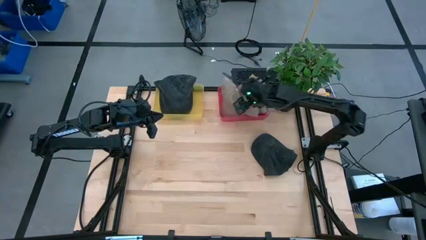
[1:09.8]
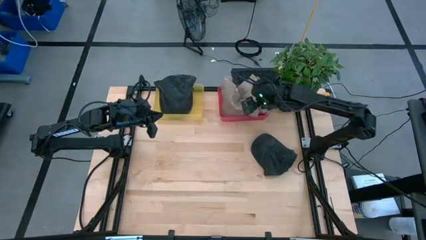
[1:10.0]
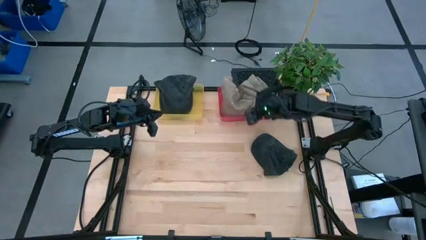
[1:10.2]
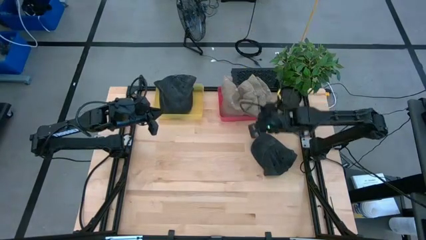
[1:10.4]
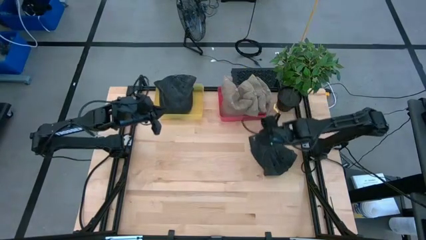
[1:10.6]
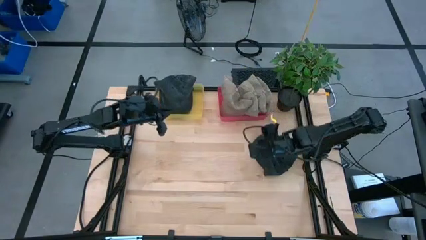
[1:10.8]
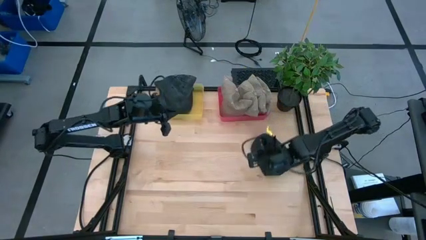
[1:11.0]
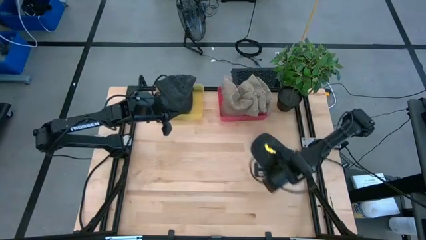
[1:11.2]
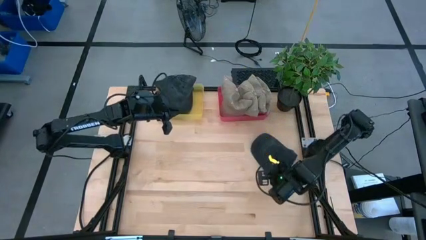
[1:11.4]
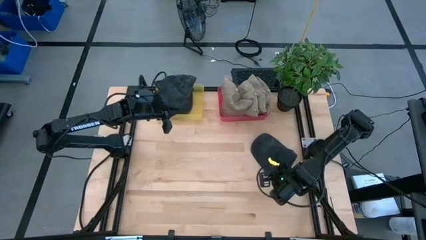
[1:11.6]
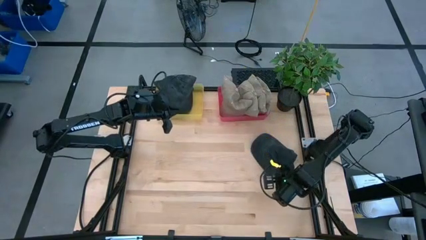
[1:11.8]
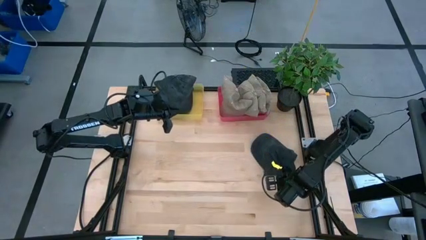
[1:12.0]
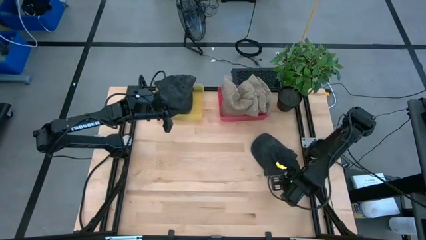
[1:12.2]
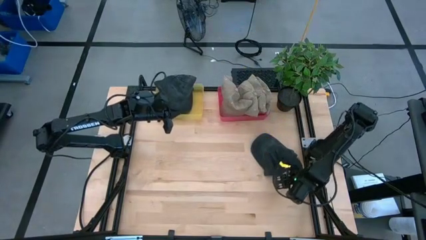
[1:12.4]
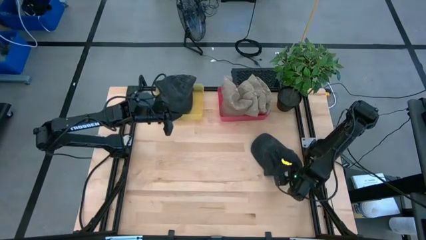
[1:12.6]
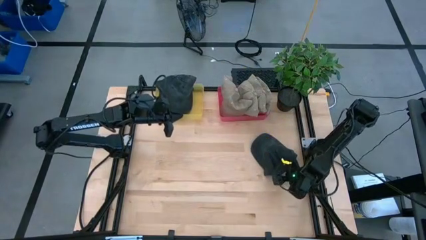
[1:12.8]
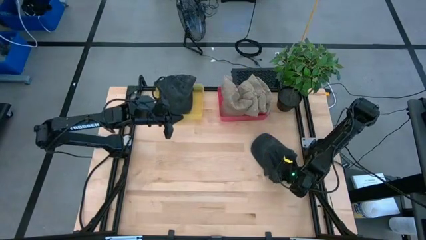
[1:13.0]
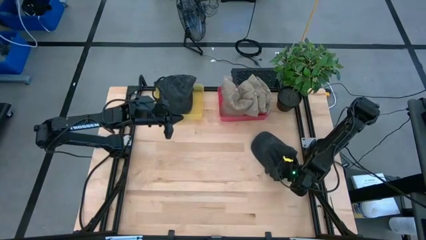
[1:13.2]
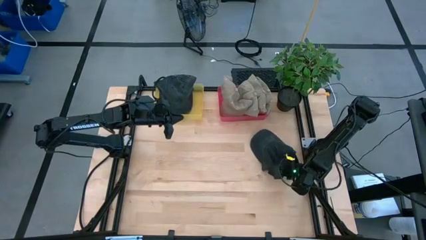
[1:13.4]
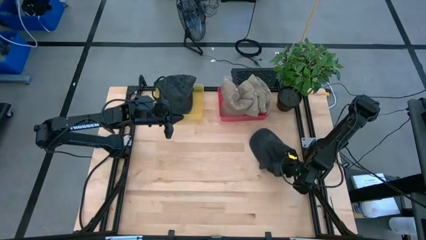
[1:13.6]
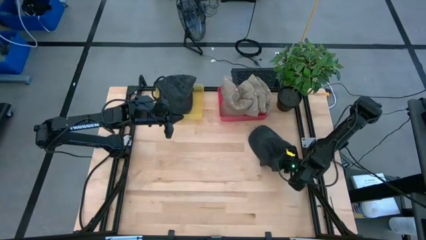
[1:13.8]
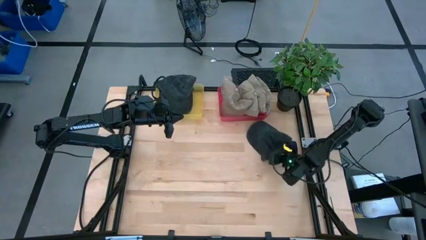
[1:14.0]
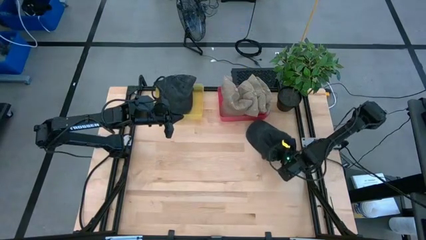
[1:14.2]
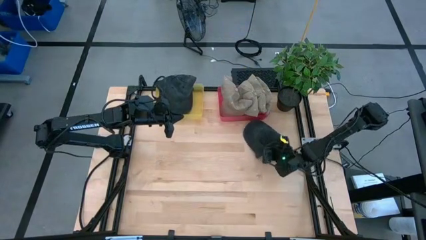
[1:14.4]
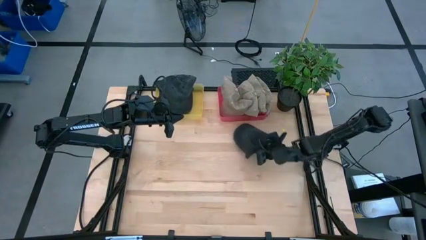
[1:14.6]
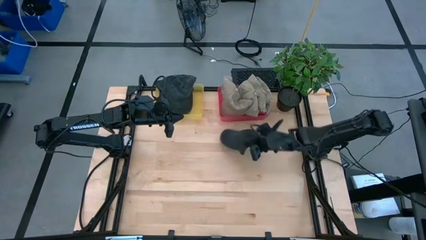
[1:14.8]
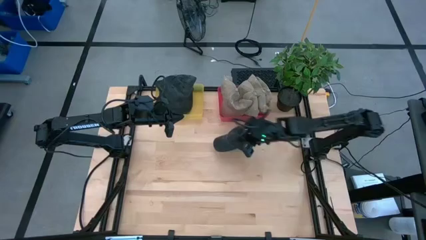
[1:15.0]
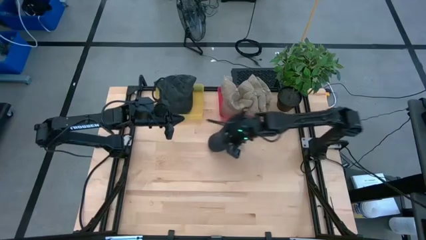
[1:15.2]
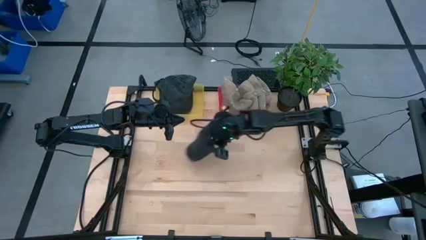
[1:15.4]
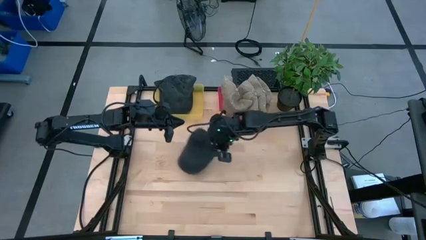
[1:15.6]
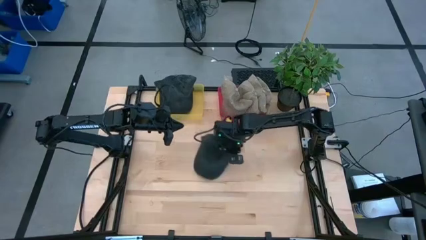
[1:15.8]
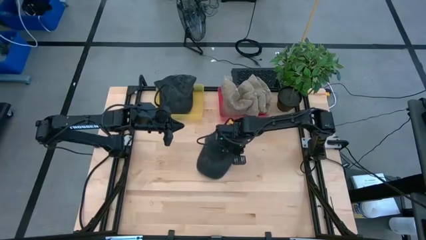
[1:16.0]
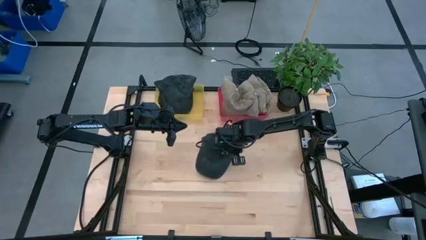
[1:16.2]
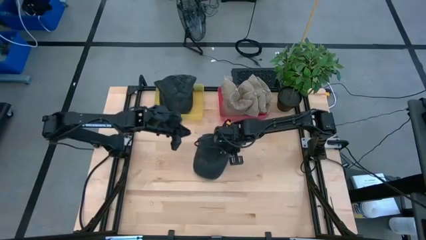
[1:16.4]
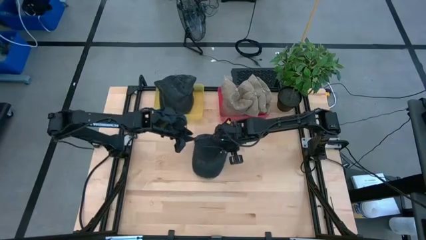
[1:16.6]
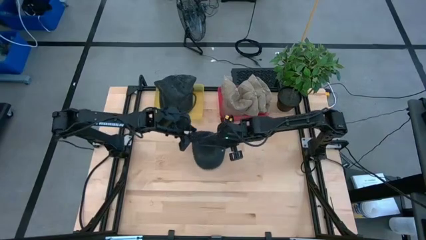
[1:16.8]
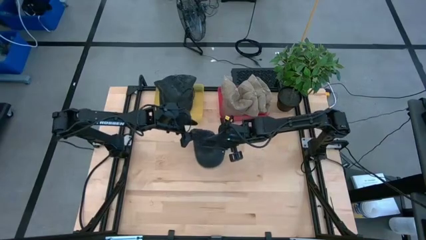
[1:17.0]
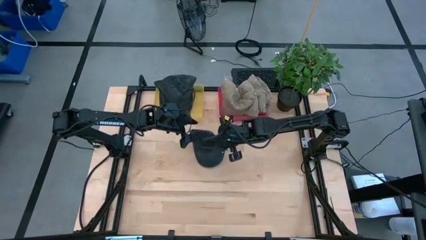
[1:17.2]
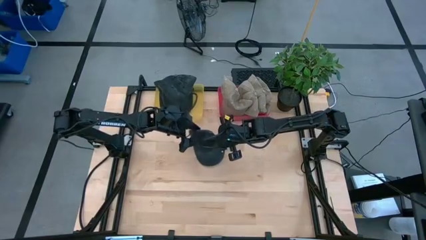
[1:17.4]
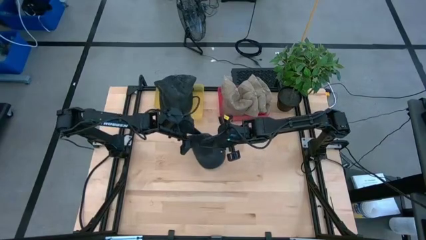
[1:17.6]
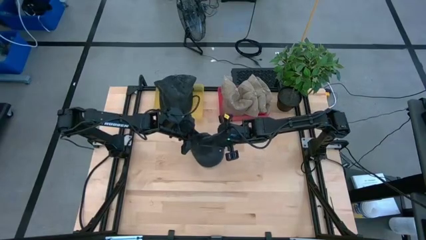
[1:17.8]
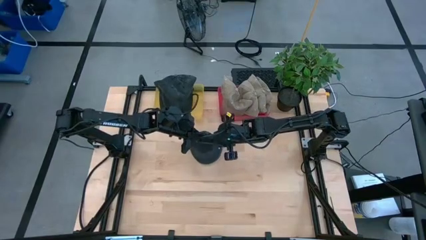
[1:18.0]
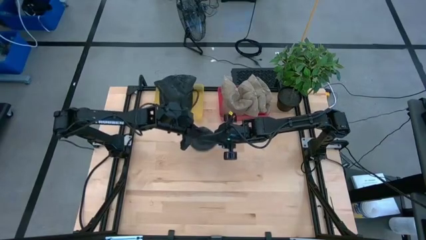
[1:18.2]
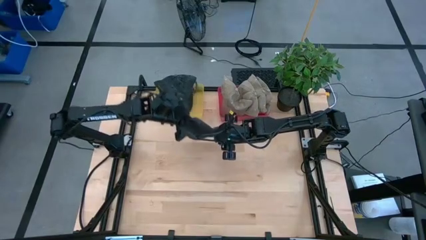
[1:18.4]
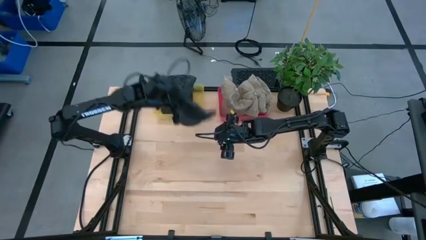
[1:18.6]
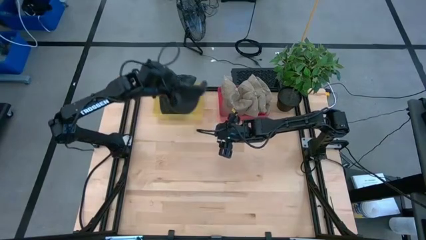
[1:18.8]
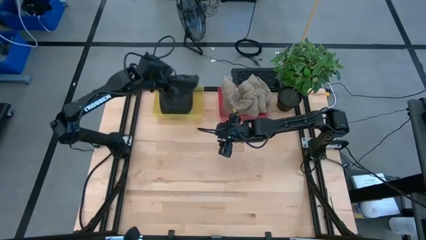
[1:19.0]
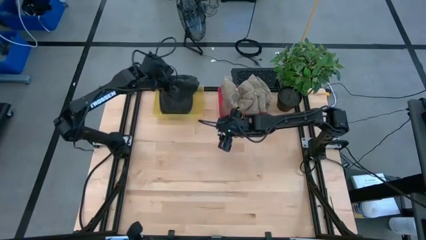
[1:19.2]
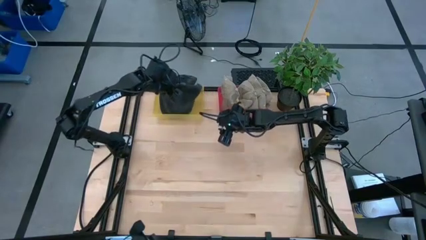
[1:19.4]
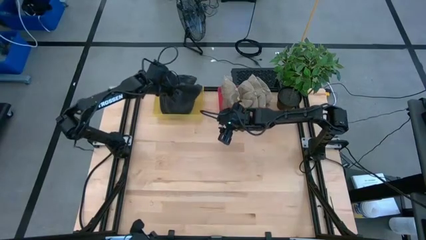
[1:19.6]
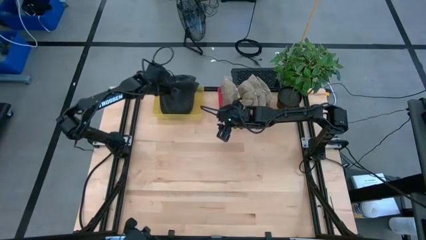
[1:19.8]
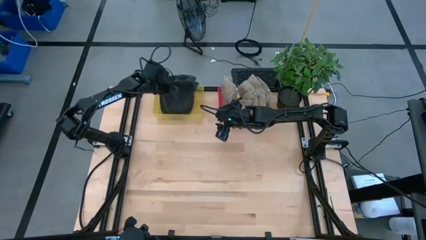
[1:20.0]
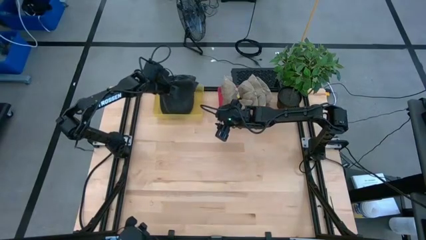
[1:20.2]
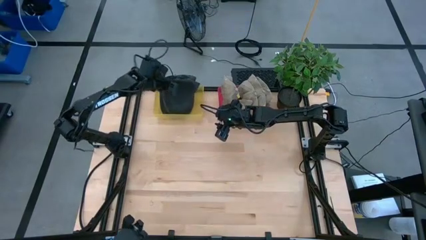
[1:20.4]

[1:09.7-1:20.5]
Task: Pick & Place hat
Put the black cap into the yellow bin

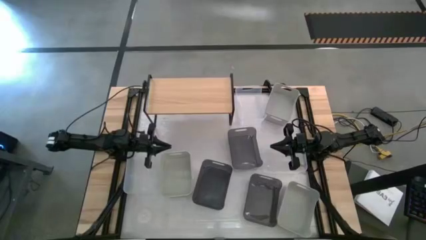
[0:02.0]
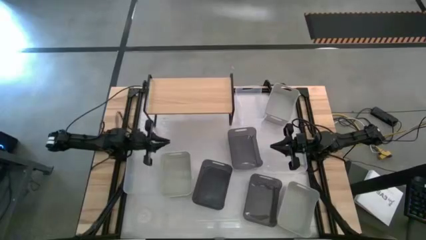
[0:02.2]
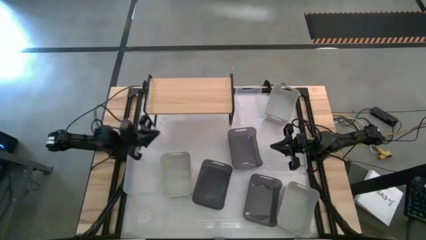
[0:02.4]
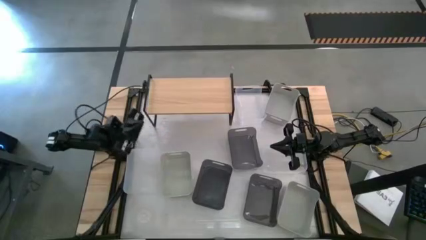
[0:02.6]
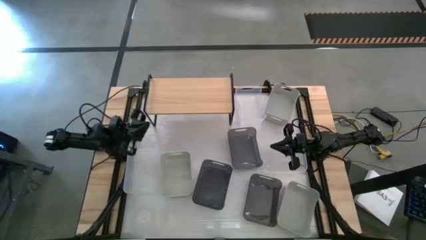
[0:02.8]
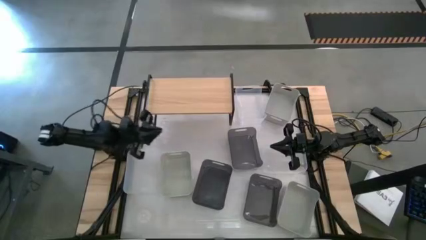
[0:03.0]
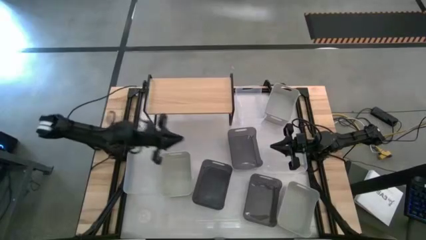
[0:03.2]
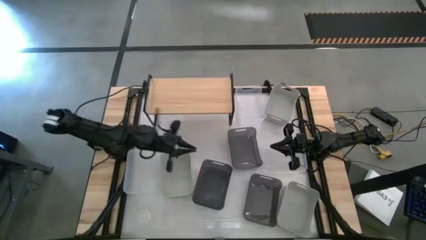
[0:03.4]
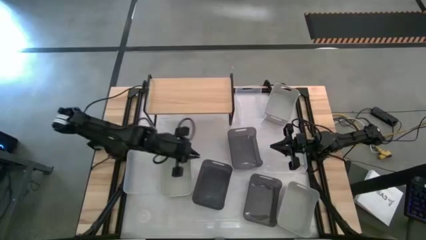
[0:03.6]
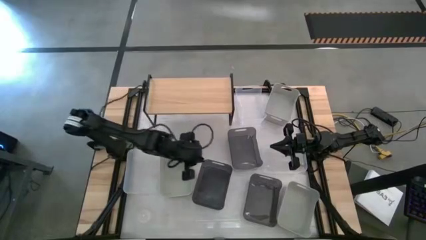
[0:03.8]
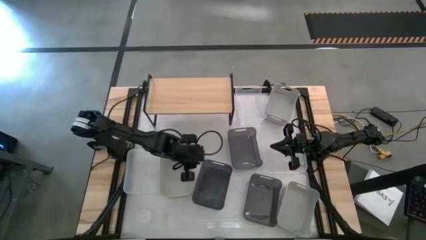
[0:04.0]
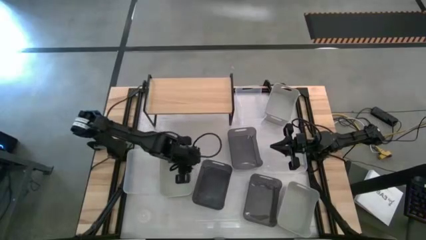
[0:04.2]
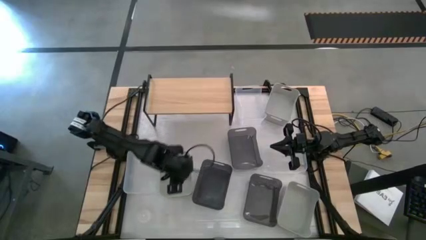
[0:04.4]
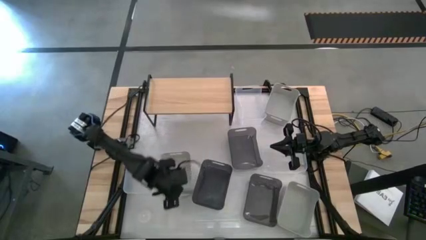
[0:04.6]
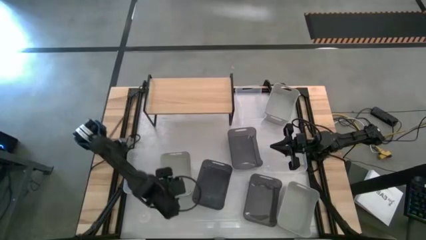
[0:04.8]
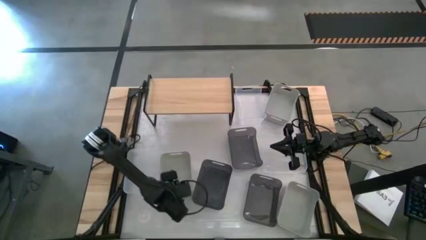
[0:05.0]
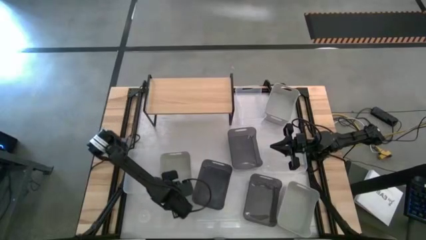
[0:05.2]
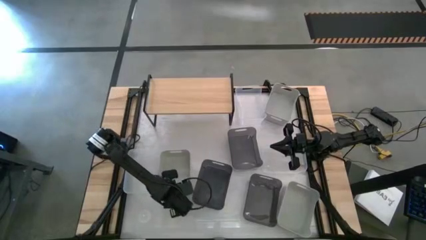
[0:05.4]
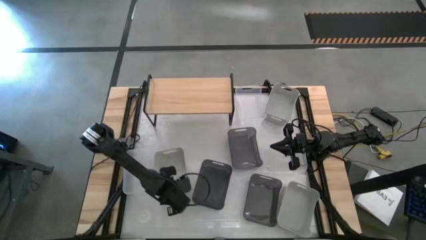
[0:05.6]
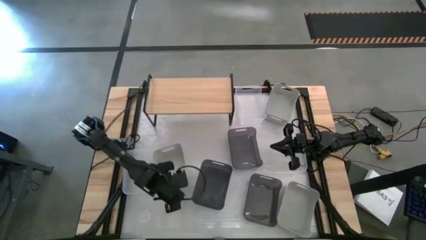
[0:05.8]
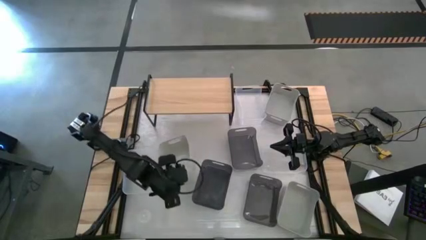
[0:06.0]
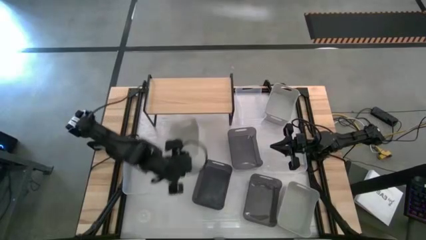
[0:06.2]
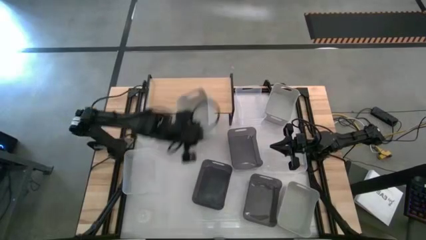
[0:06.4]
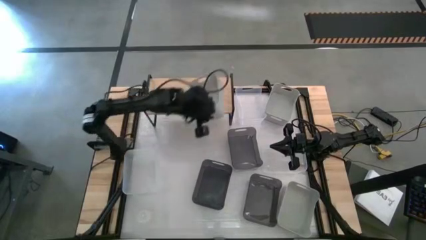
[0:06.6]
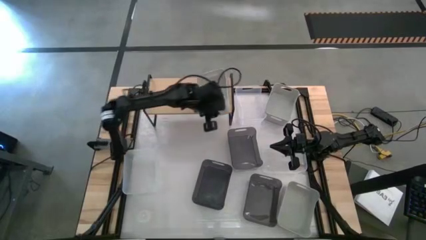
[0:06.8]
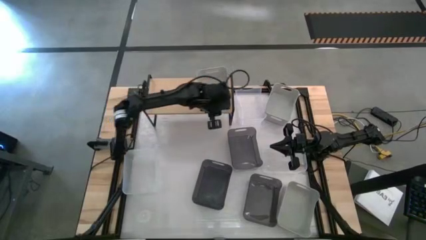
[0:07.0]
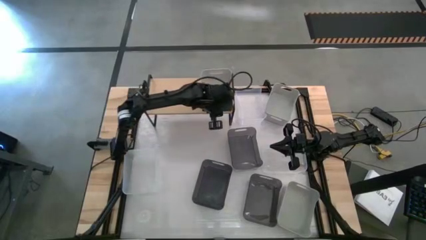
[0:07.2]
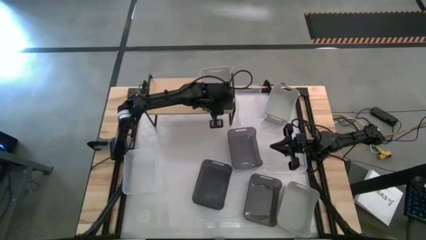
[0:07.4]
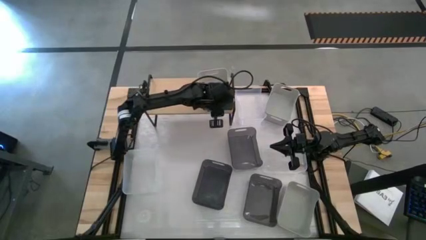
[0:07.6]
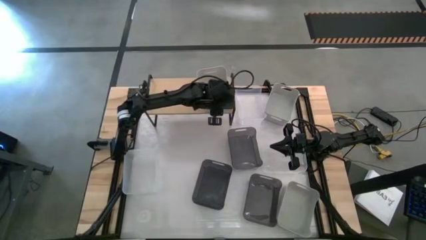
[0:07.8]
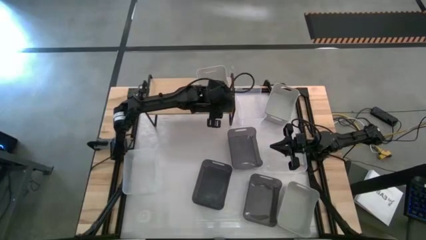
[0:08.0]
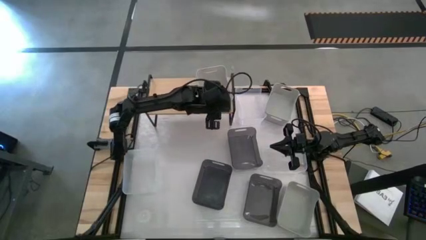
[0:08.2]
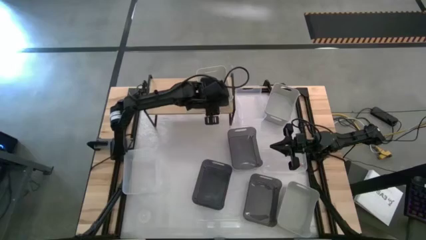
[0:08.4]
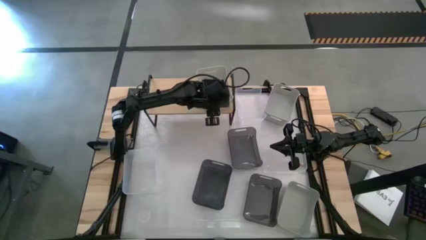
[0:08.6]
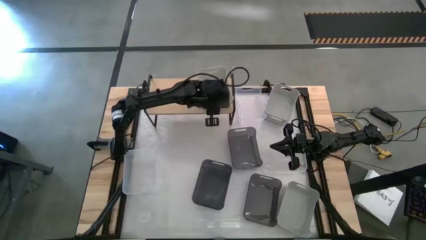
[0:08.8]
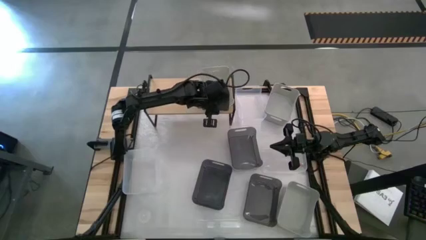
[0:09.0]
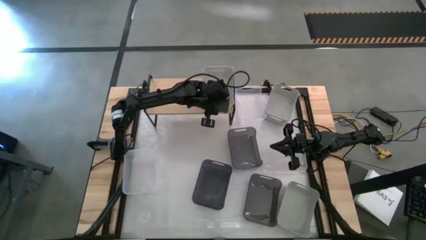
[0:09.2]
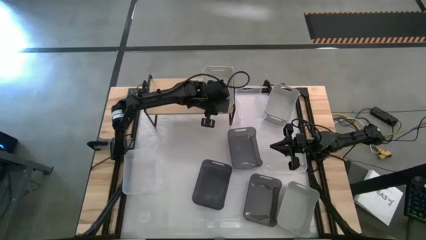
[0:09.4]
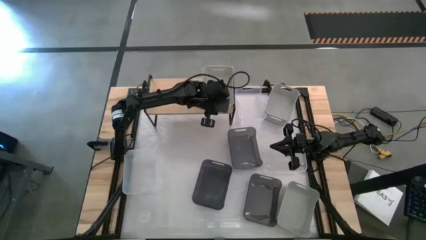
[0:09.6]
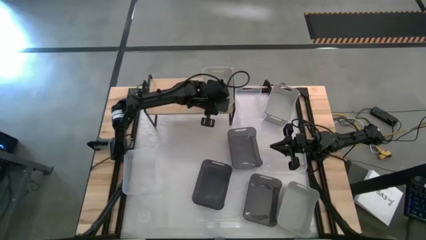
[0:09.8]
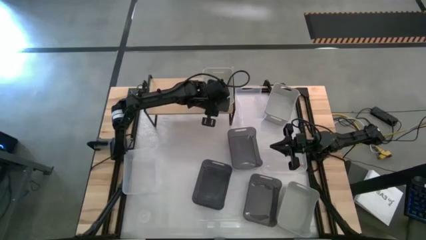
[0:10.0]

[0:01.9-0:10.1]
Task: Stack baskets on shelf by color
Put the left gray bin on the shelf
